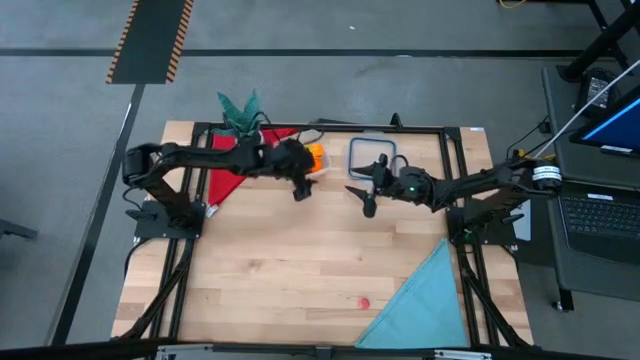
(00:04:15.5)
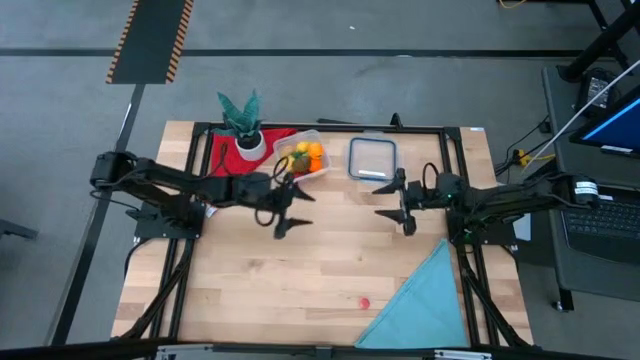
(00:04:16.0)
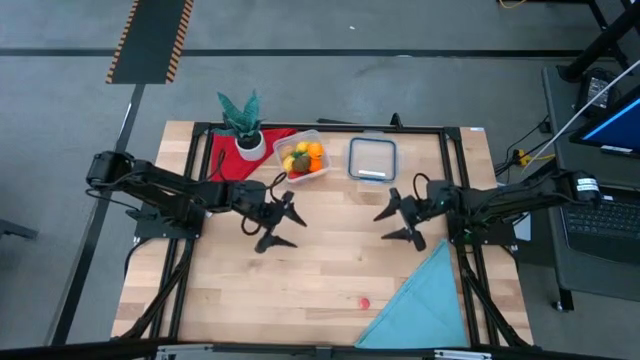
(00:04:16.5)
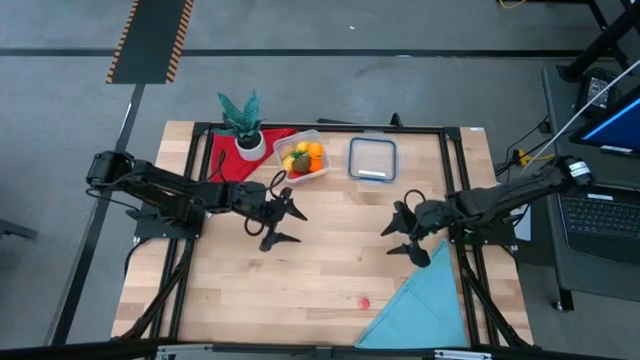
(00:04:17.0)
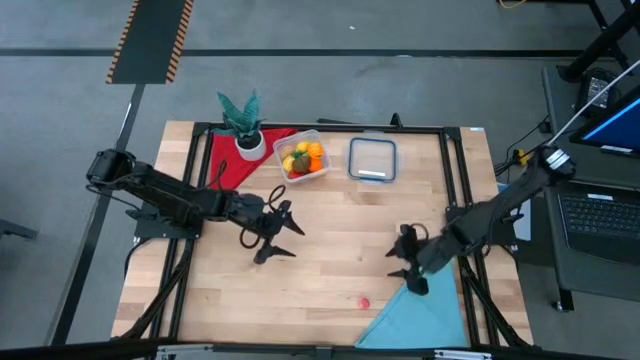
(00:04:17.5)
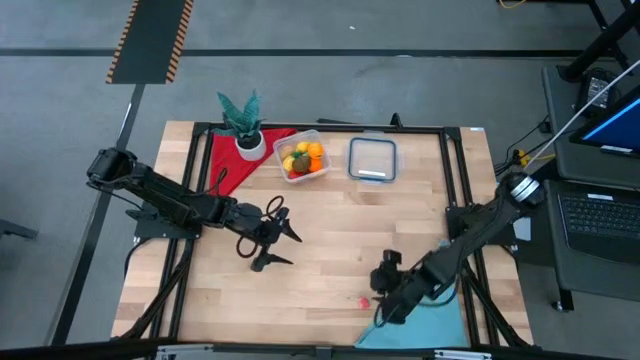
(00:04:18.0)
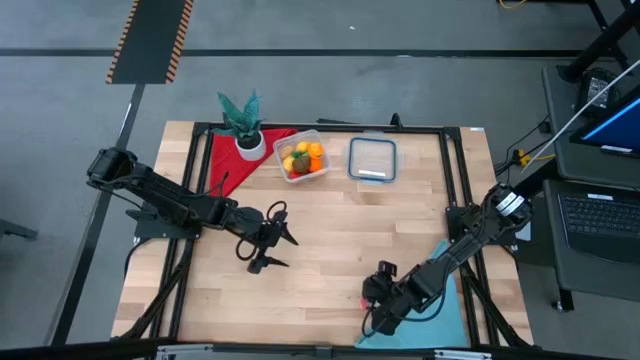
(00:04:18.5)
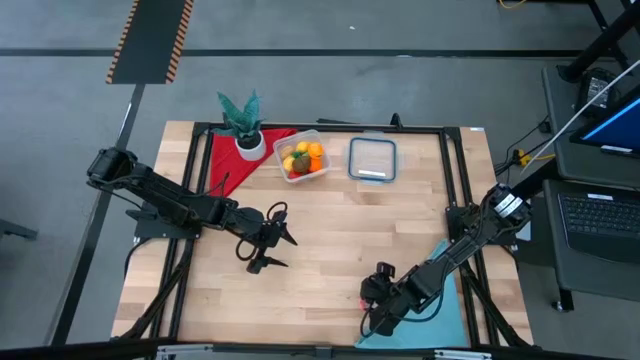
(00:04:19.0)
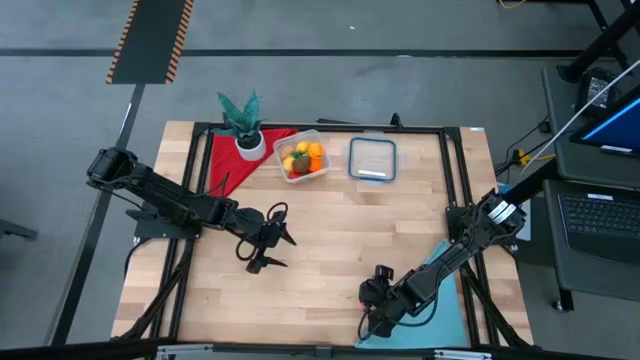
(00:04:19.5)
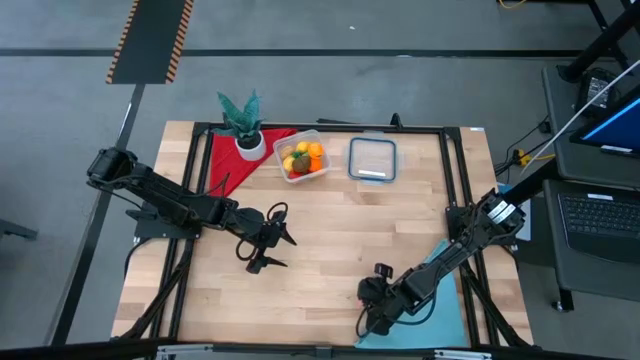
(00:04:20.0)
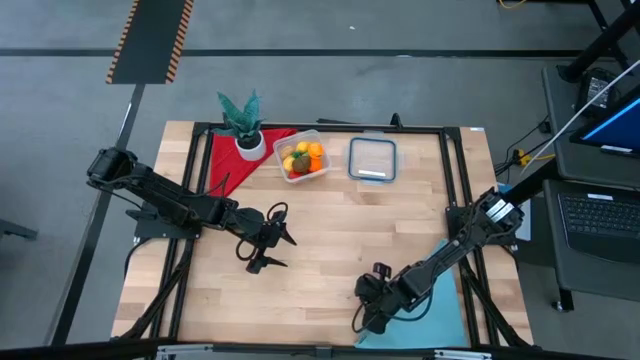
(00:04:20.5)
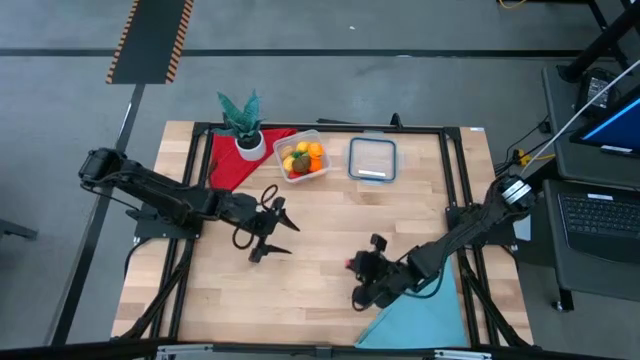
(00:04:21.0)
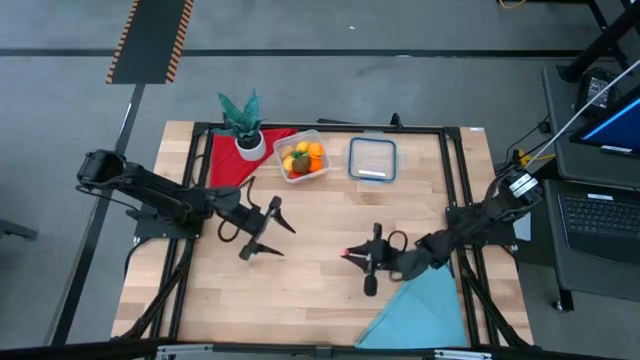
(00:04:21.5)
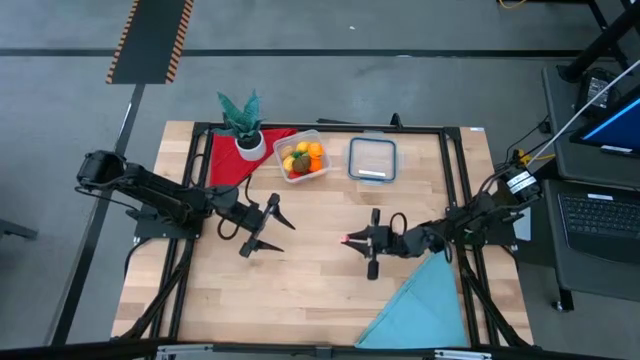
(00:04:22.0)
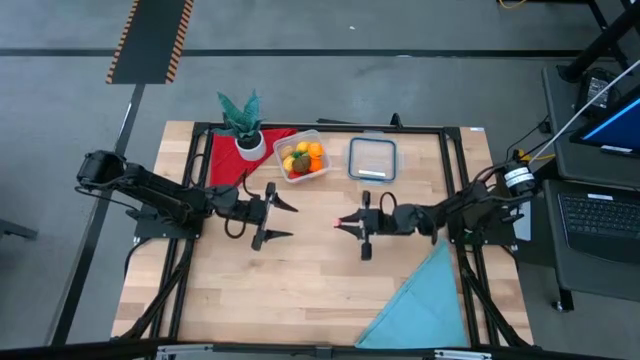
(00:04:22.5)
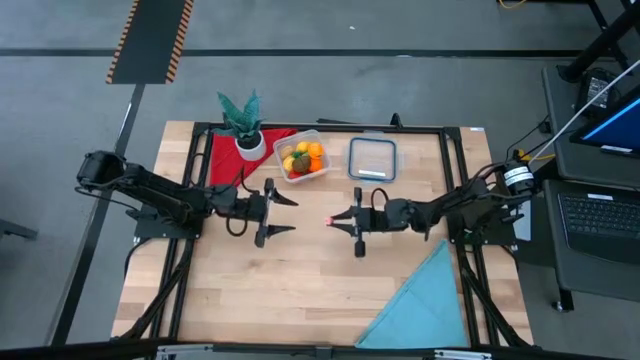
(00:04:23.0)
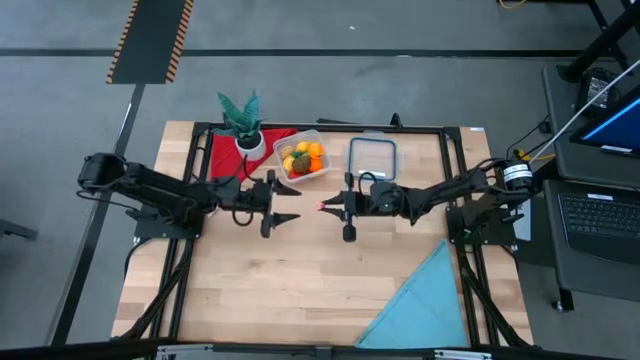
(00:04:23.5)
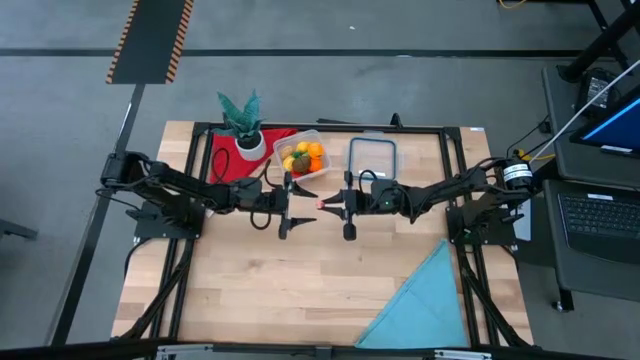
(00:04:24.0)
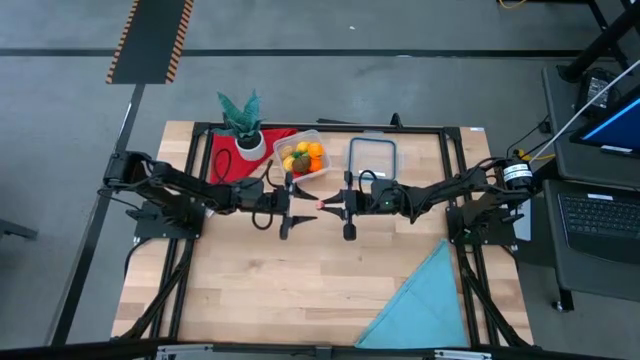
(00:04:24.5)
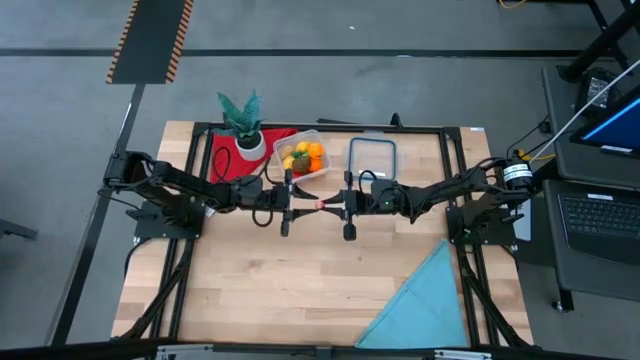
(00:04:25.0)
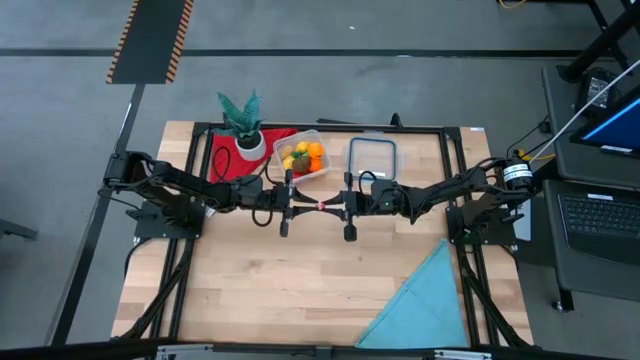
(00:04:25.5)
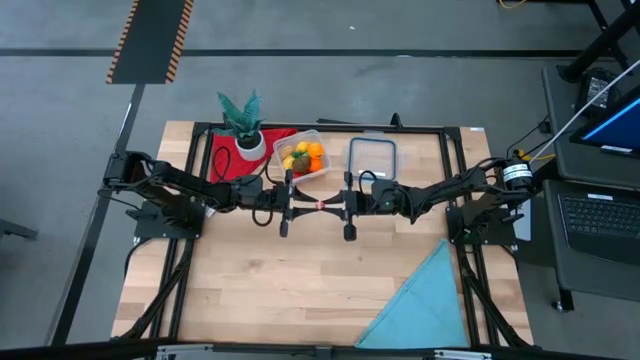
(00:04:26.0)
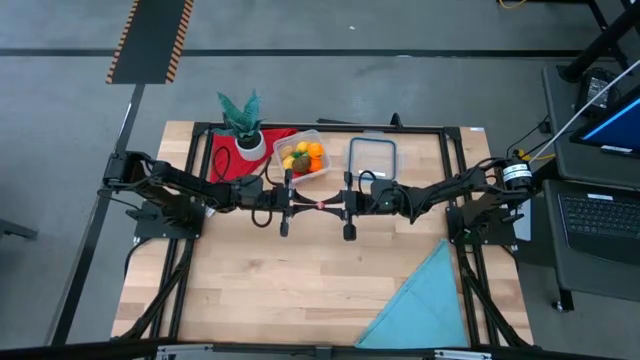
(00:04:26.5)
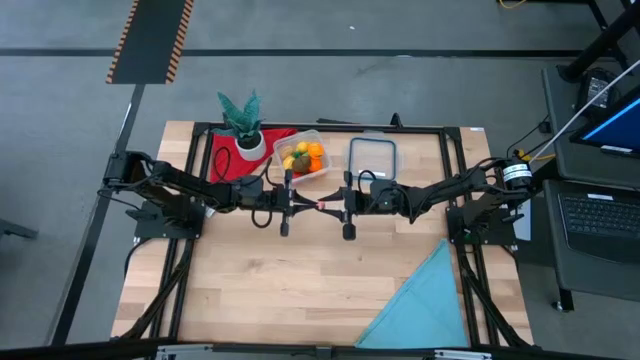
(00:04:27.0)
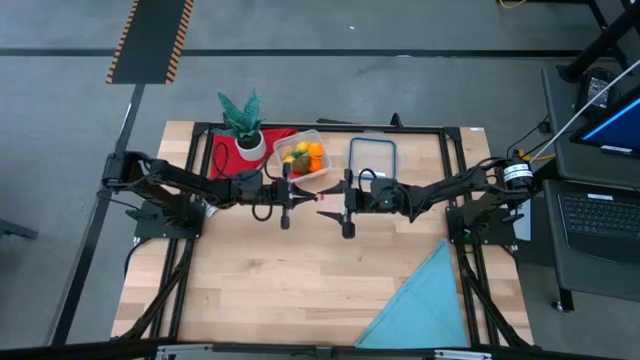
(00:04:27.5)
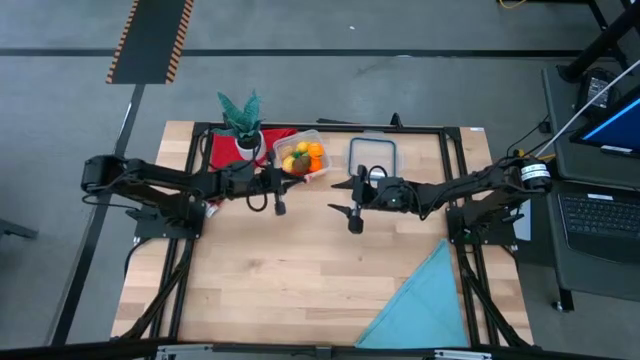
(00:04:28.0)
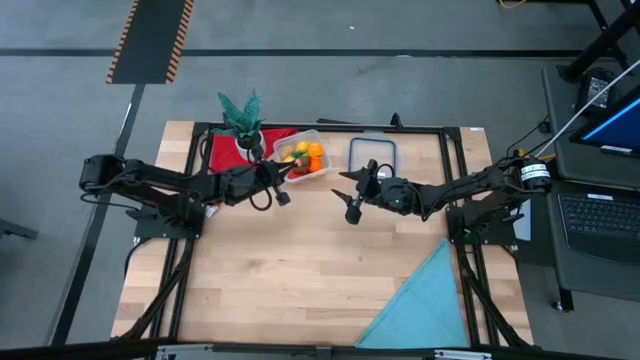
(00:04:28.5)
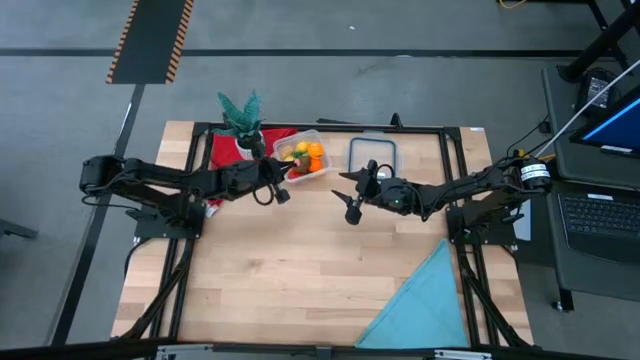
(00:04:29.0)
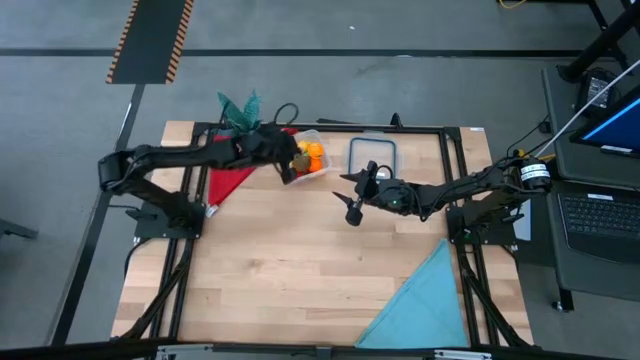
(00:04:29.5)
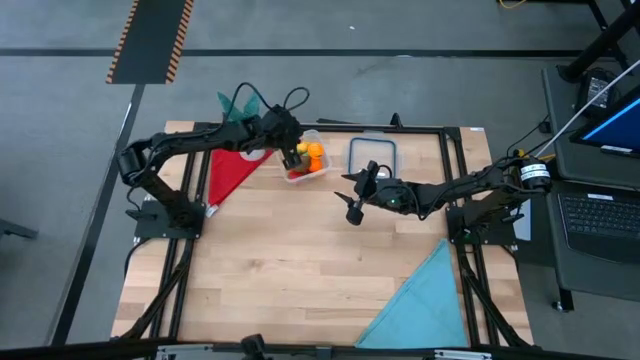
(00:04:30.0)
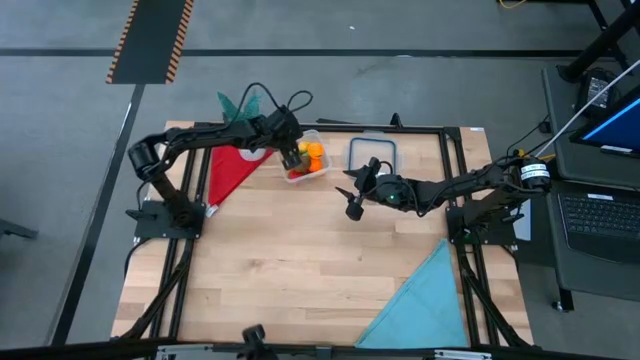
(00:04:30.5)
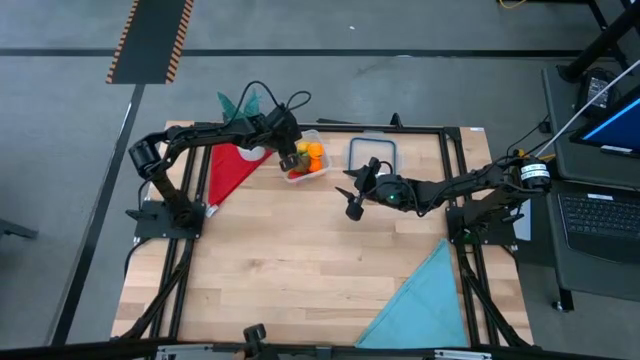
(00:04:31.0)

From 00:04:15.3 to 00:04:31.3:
Task: Pick and placing Produce into tupperware
Put the peach into the transparent bin

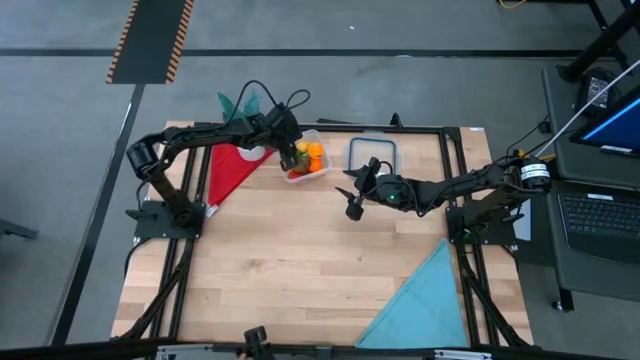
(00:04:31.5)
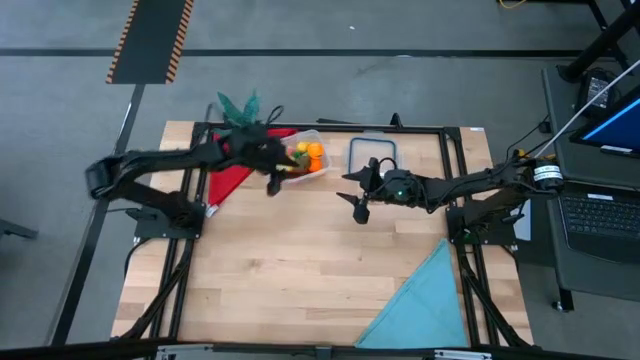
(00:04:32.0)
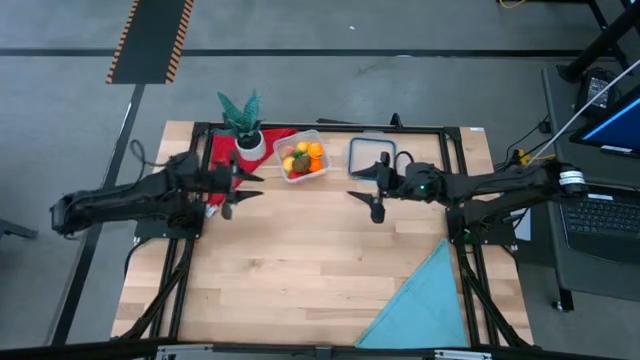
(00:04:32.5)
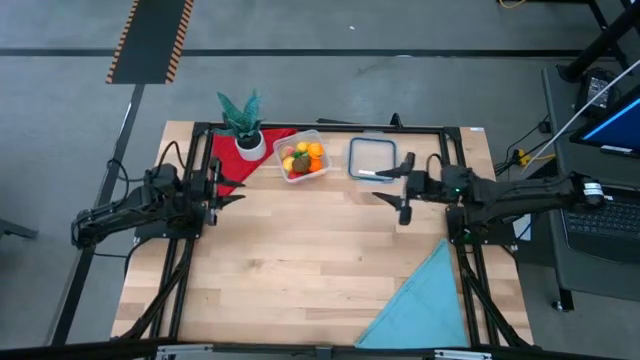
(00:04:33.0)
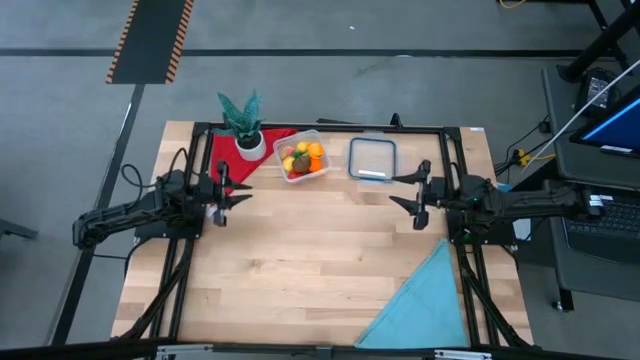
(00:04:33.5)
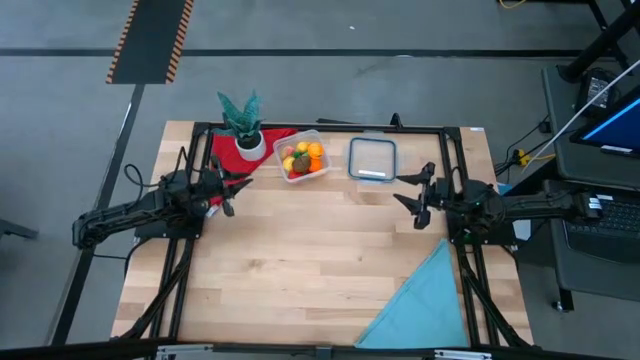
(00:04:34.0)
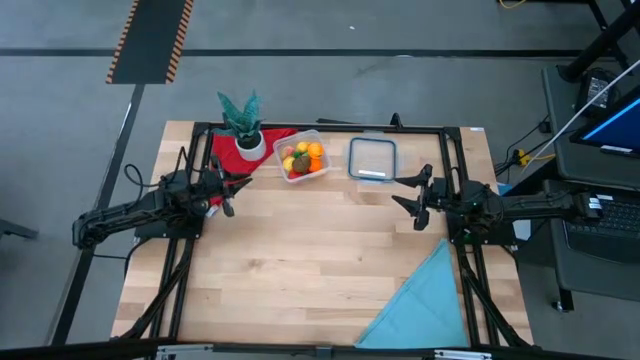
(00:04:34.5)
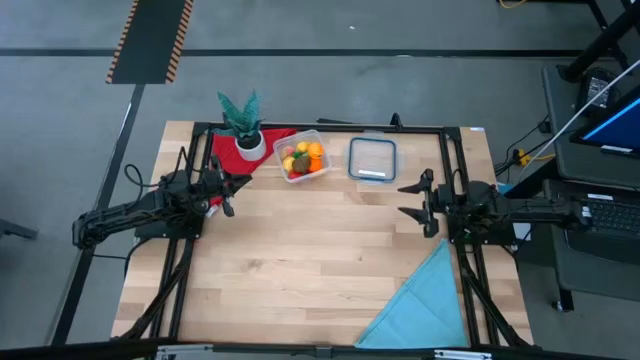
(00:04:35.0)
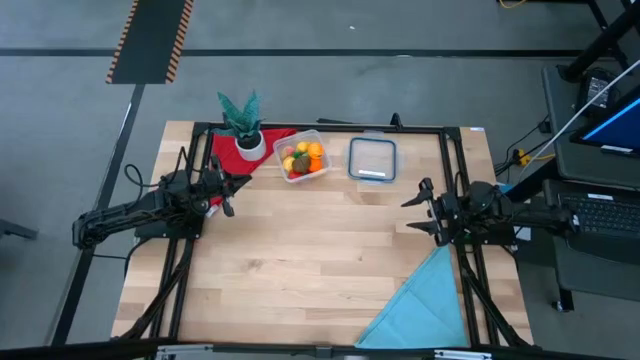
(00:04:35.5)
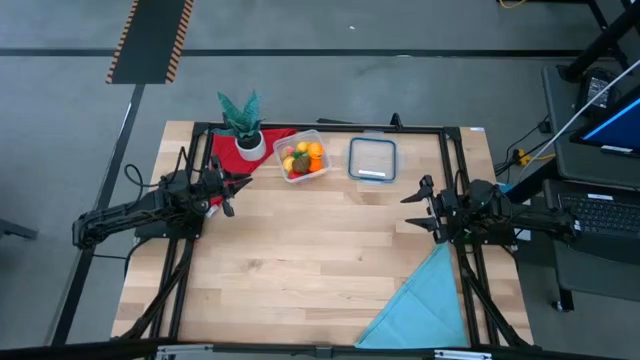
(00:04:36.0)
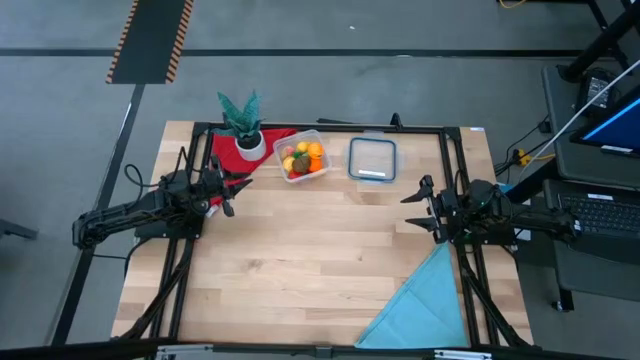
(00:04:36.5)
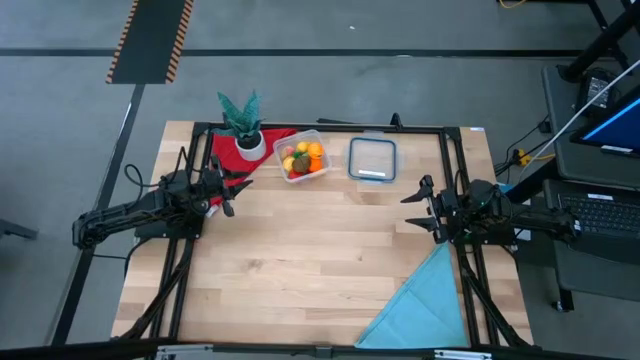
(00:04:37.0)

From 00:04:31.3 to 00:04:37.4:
Return to home position
